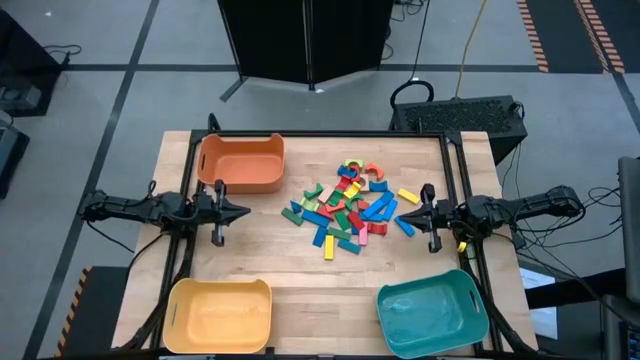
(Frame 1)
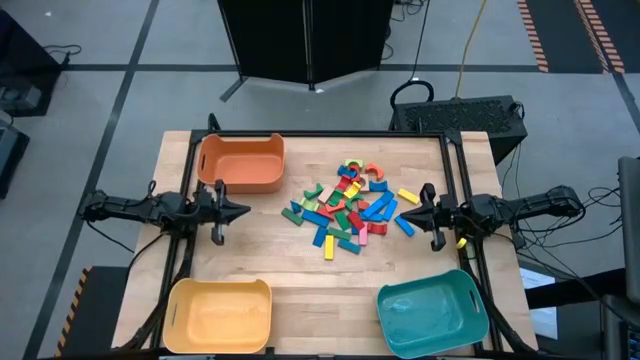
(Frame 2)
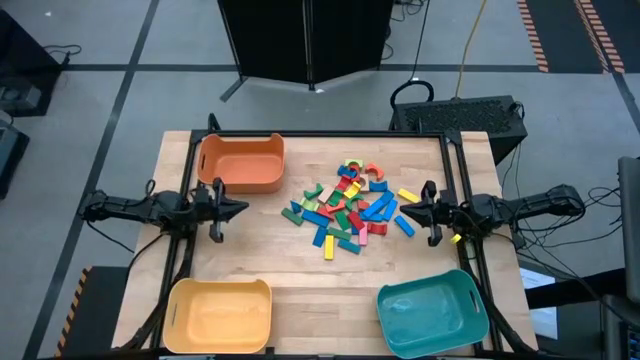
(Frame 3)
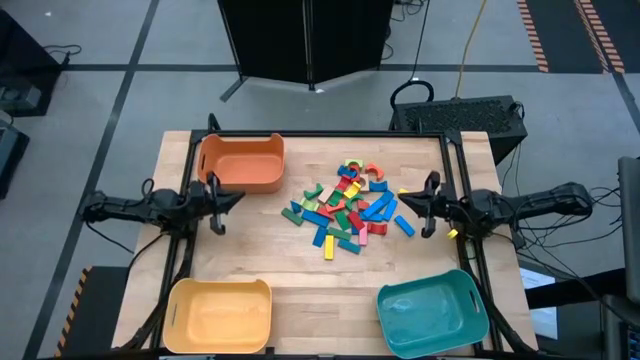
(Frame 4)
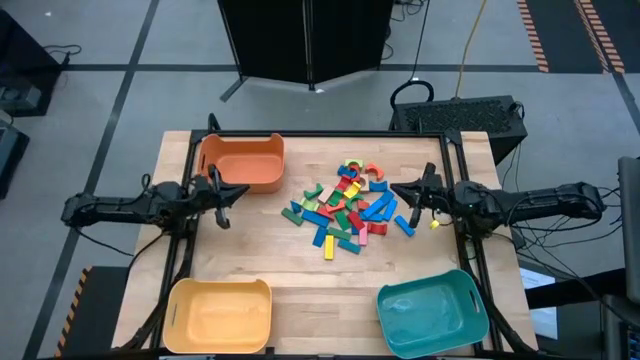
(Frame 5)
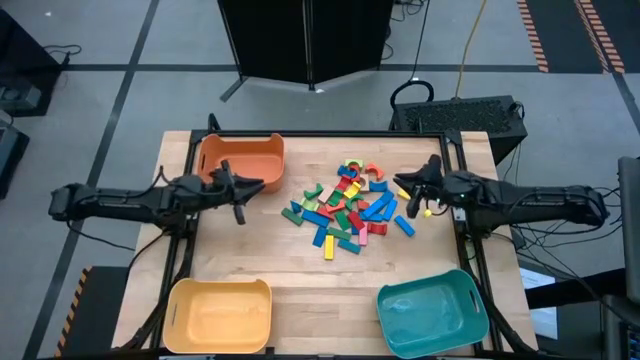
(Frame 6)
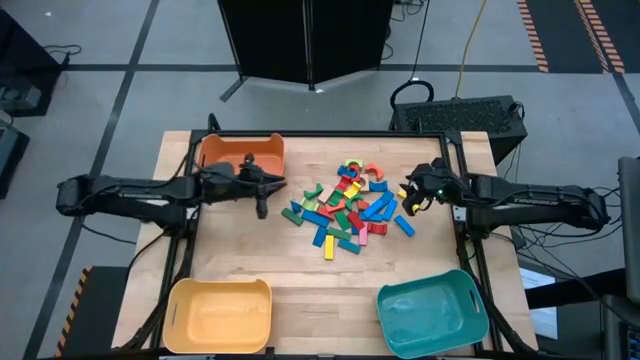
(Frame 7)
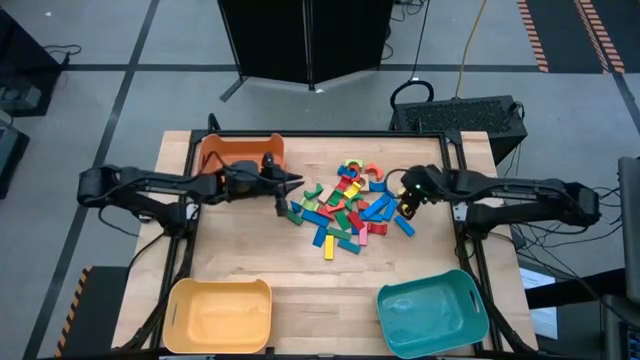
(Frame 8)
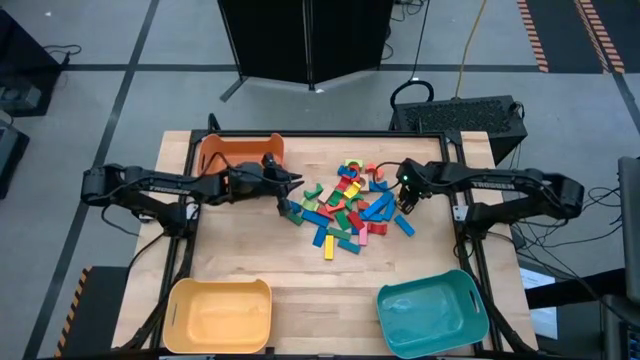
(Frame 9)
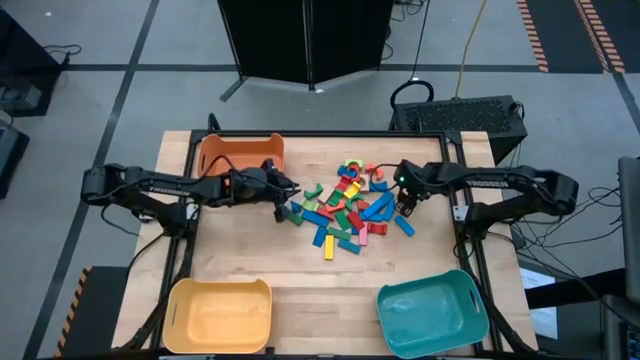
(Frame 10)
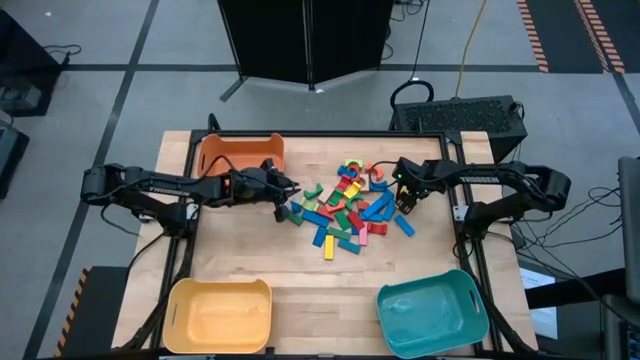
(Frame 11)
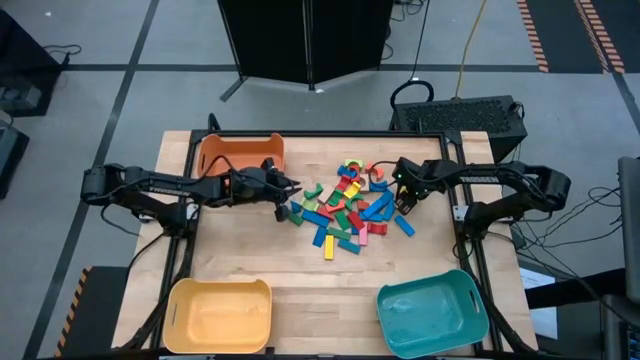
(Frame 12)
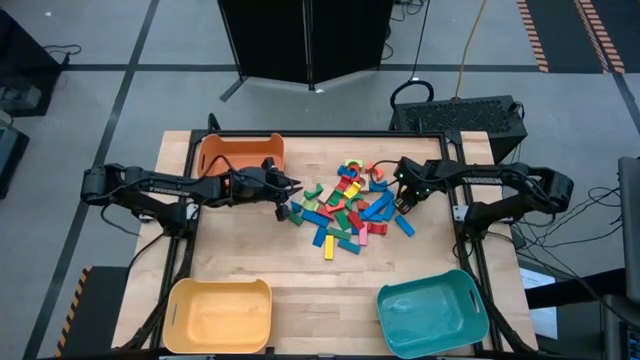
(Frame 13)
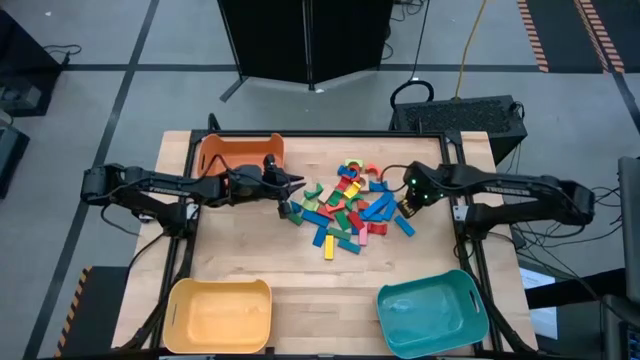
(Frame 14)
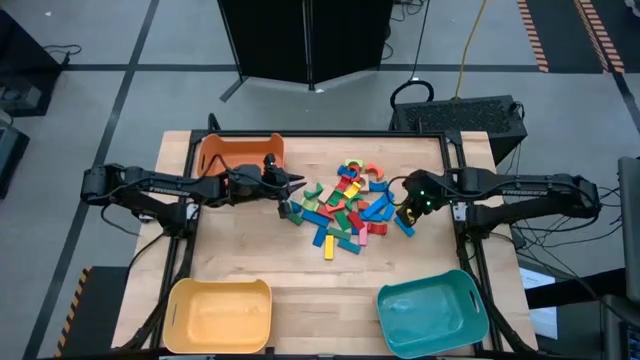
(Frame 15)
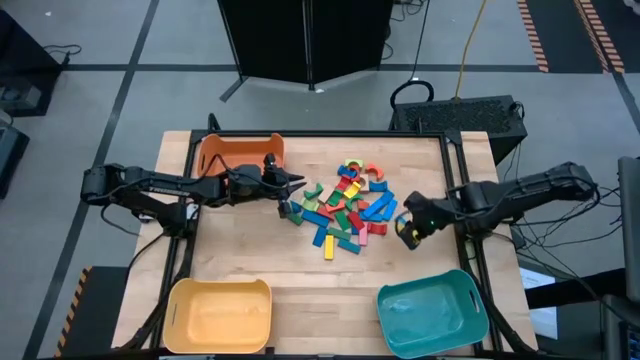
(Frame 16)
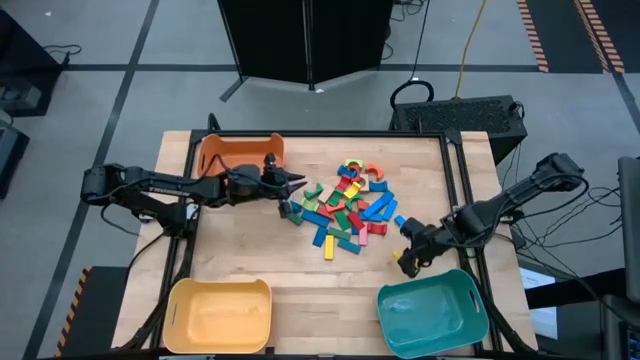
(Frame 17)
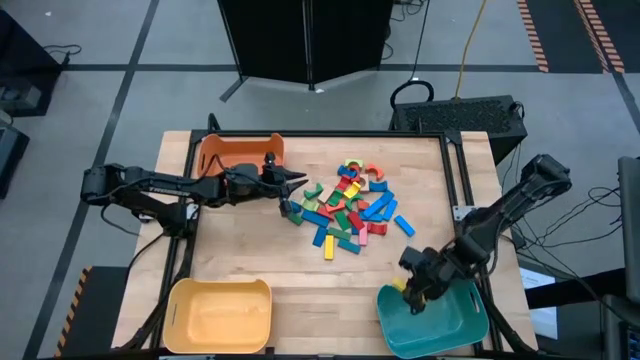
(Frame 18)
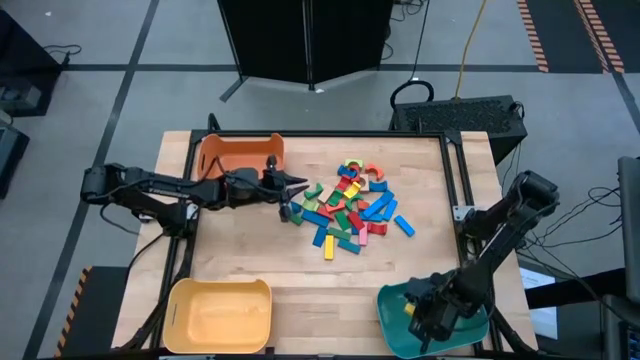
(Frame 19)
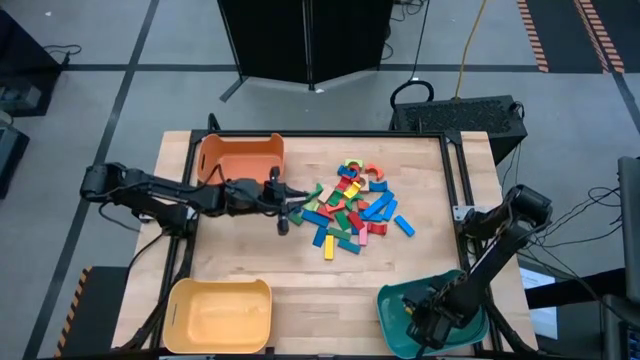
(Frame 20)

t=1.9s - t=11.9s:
Task: Sort blocks by size
Put the yellow rectangular block into the blue bin

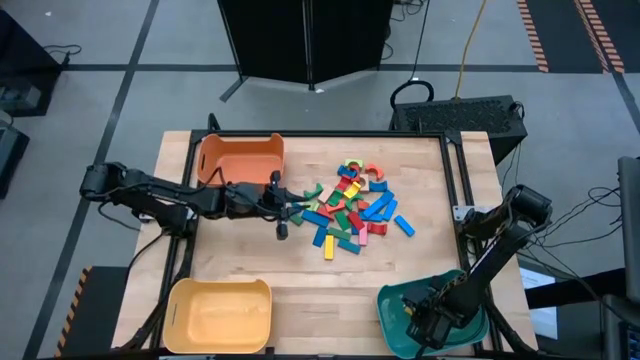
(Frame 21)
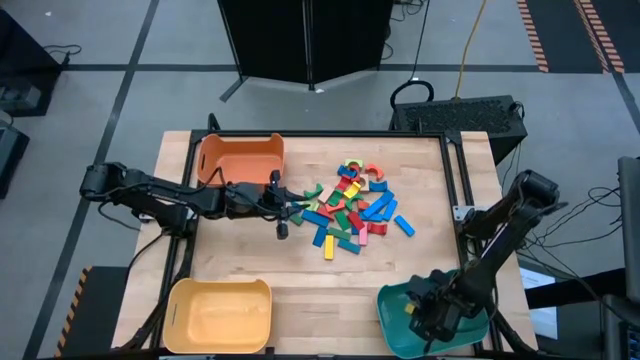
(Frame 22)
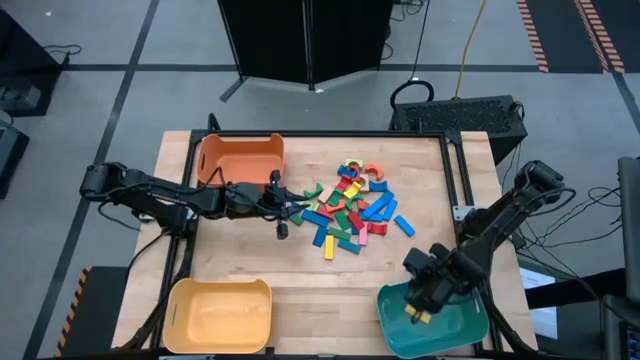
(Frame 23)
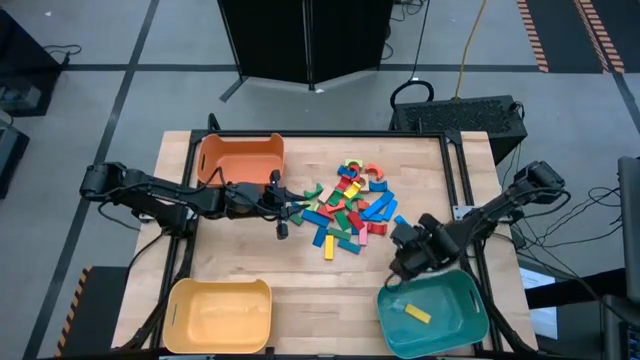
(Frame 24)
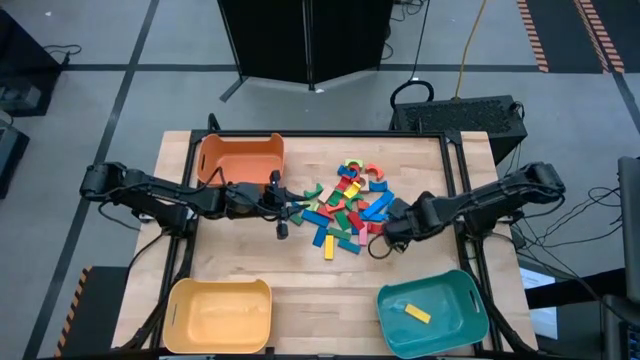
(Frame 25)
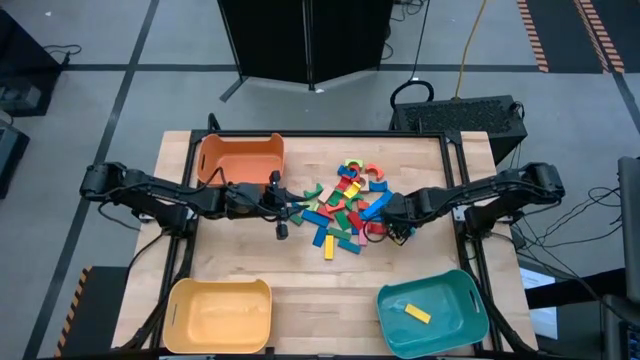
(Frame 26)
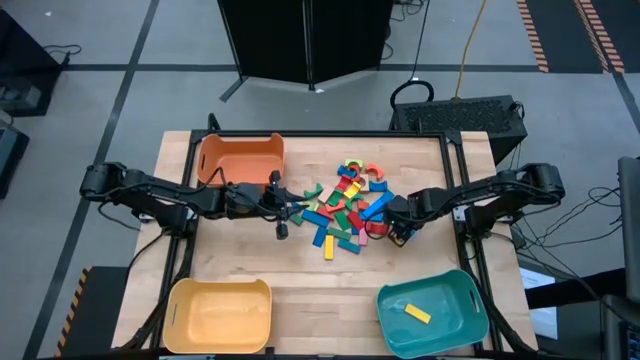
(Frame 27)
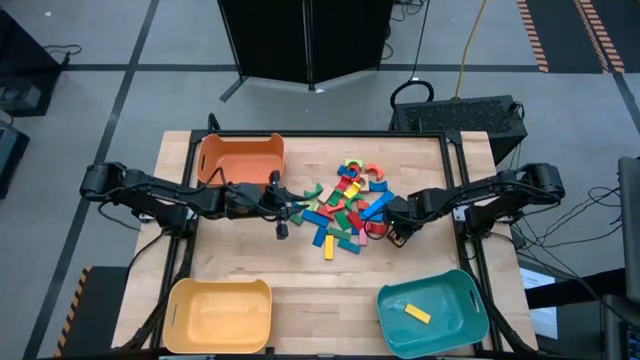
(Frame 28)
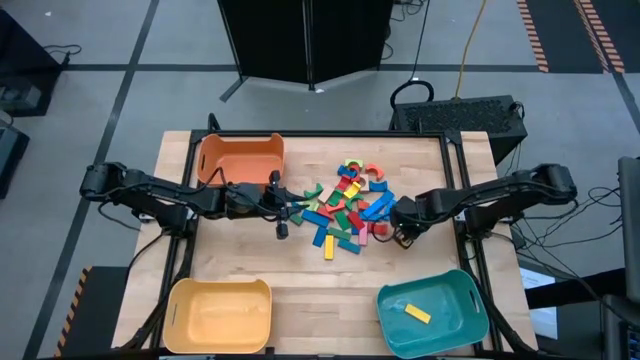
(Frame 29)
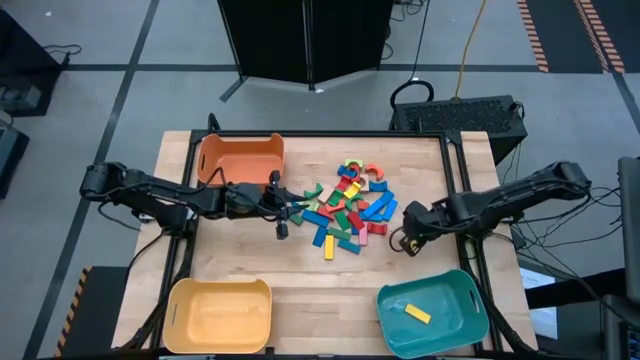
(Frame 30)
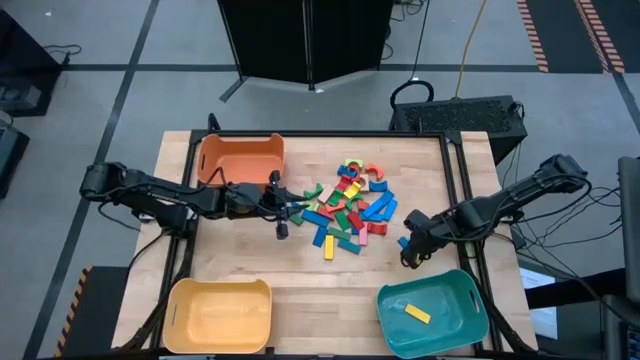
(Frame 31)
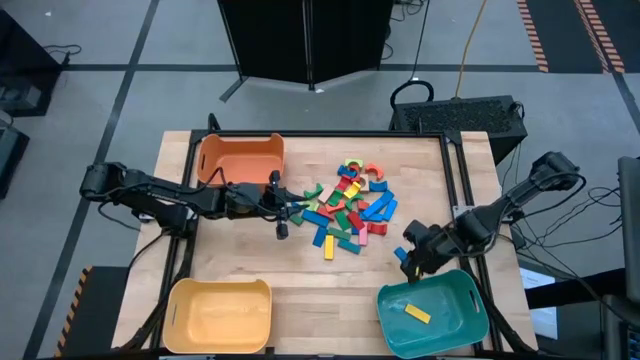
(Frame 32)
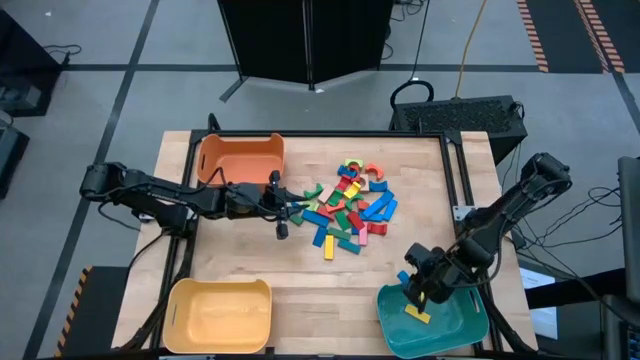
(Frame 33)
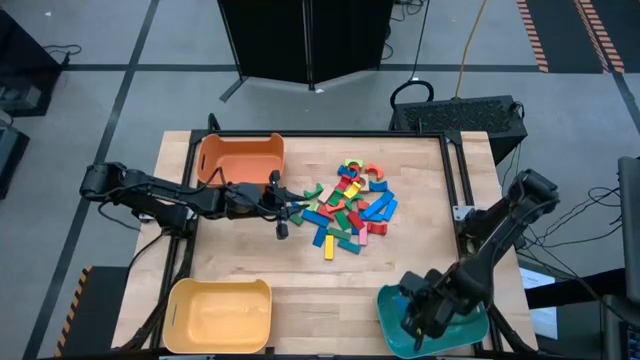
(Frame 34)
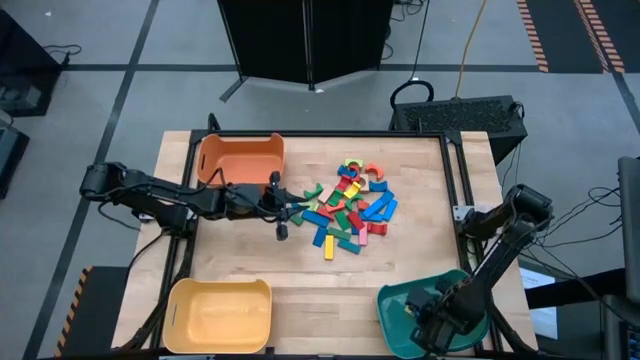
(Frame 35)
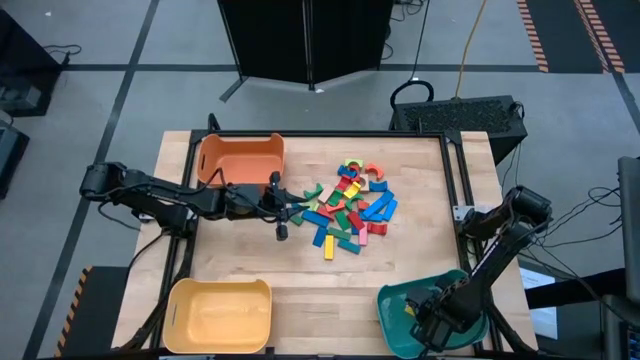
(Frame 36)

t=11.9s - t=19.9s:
Put the blue rectangular block into the blue bin

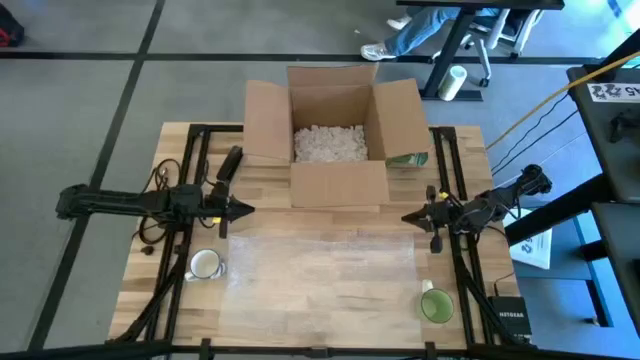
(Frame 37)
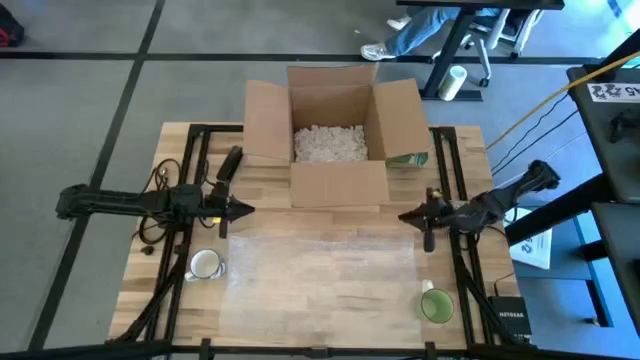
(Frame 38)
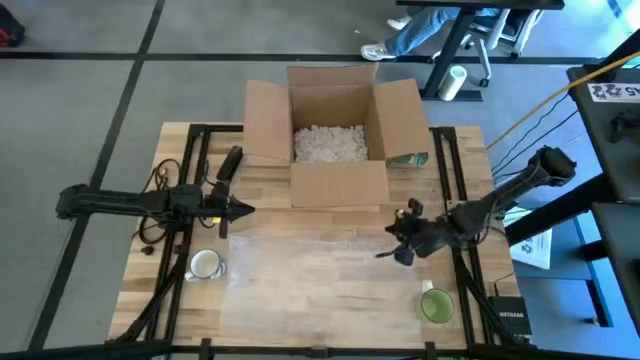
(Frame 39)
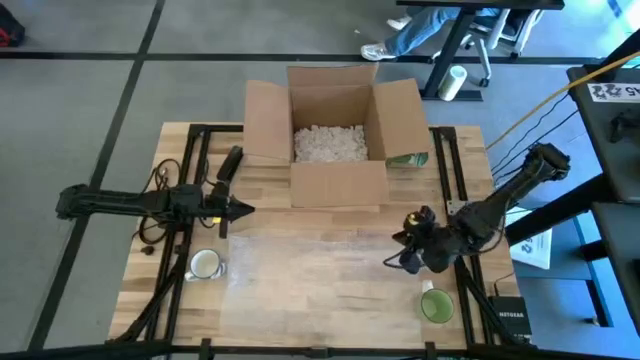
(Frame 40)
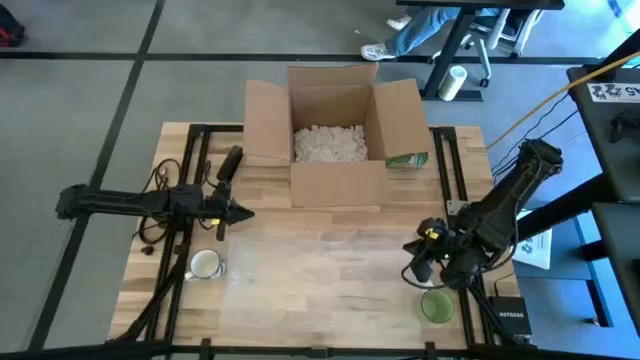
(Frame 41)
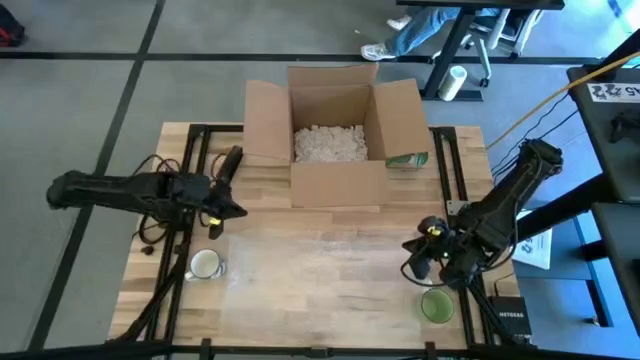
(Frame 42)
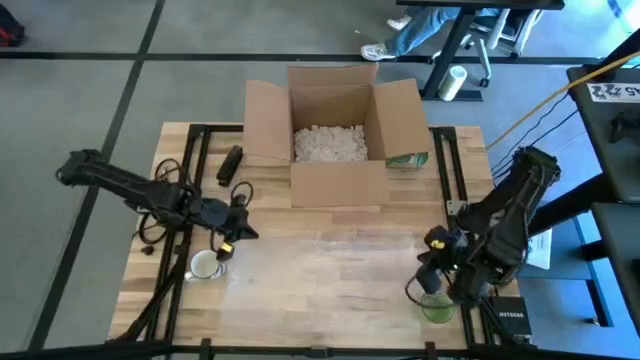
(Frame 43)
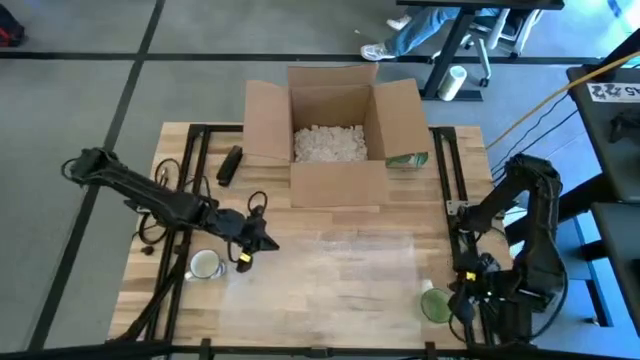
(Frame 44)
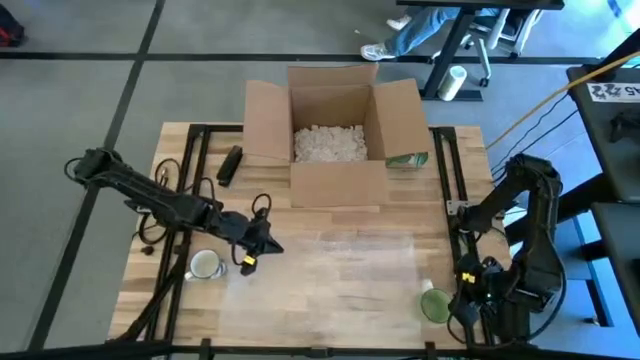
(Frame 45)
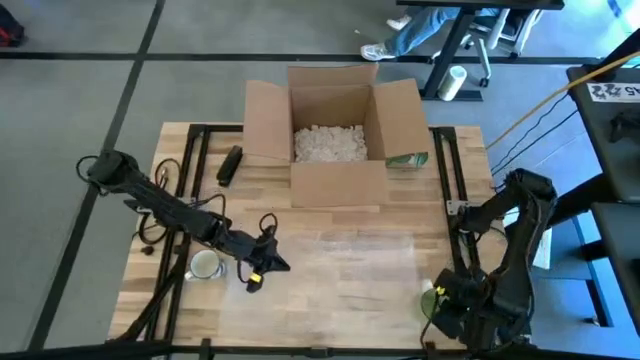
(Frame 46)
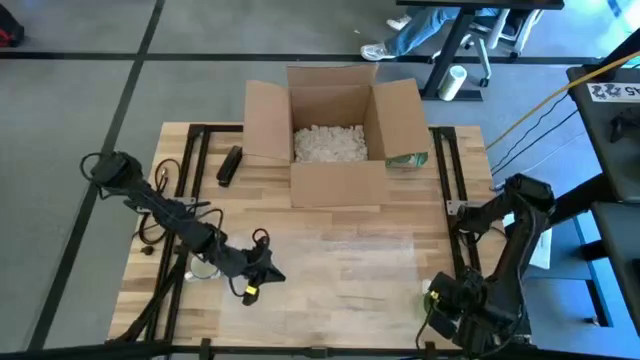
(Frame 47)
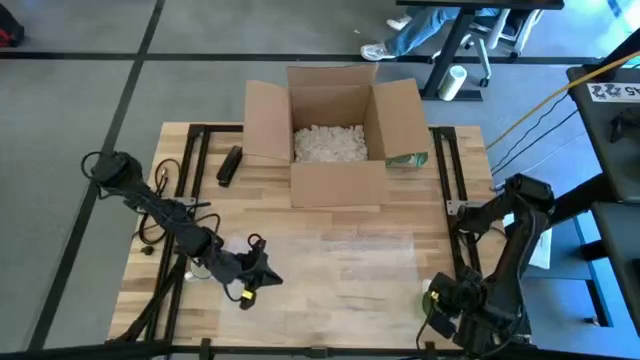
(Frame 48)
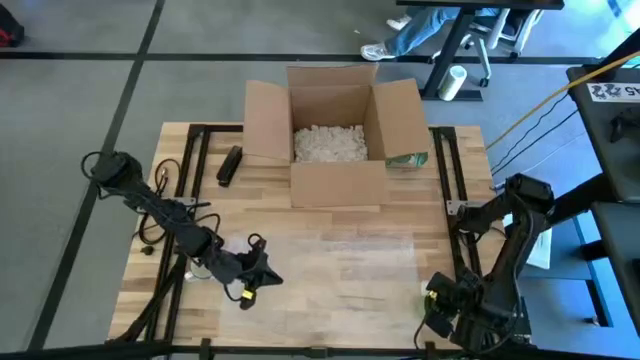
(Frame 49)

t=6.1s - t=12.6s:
Task: wrap mug
Wrap the green mug with bubble wrap
